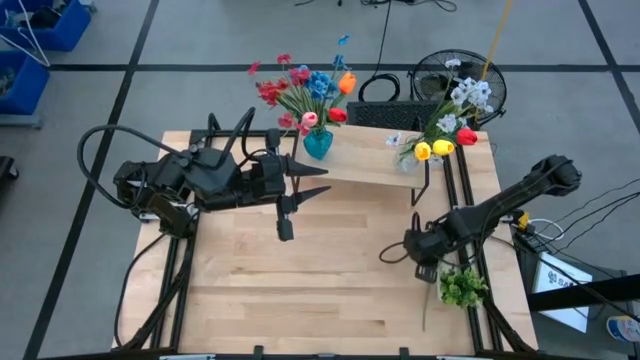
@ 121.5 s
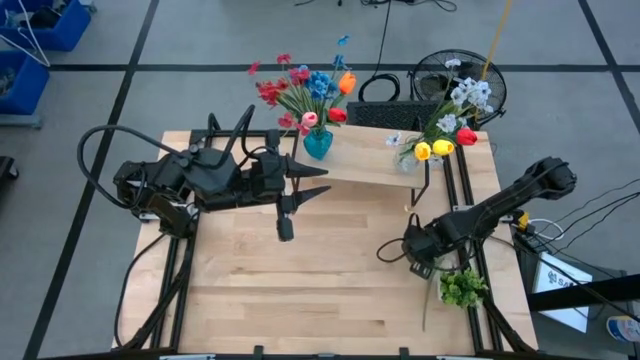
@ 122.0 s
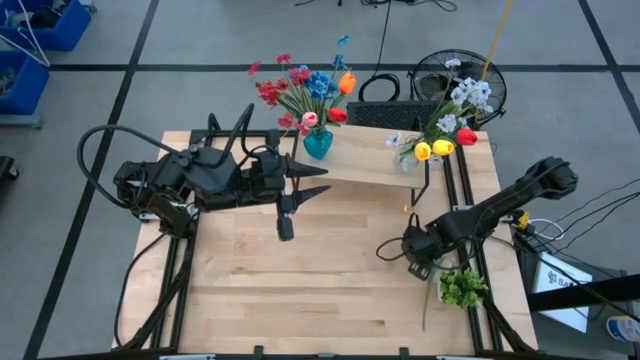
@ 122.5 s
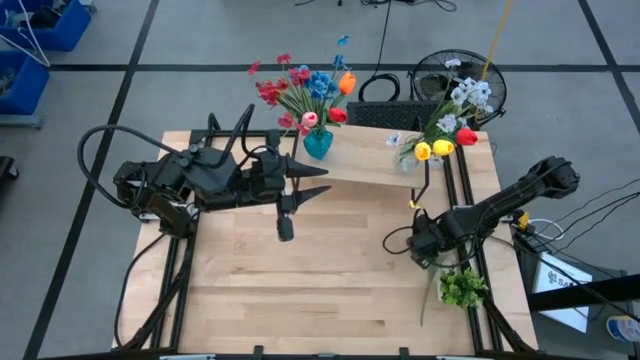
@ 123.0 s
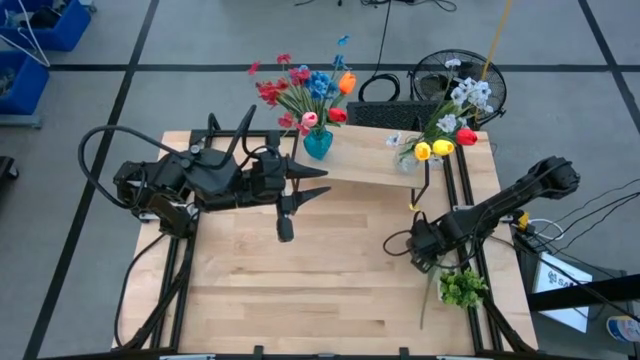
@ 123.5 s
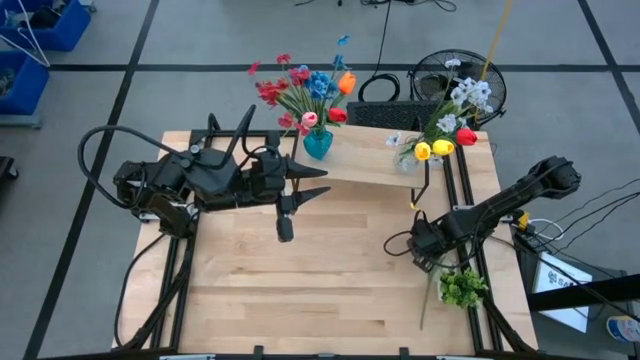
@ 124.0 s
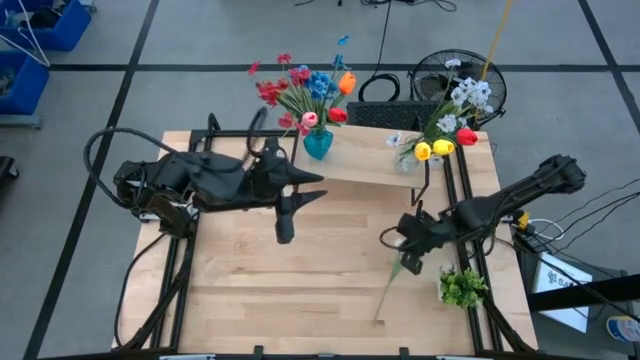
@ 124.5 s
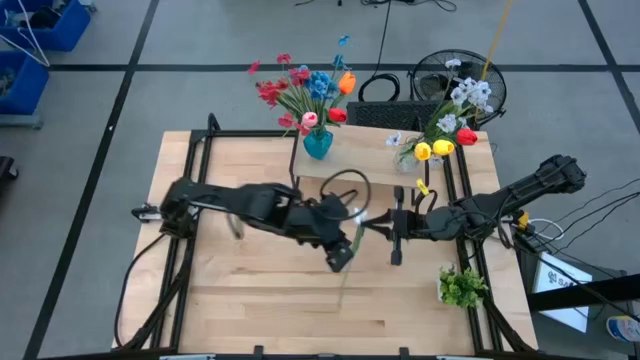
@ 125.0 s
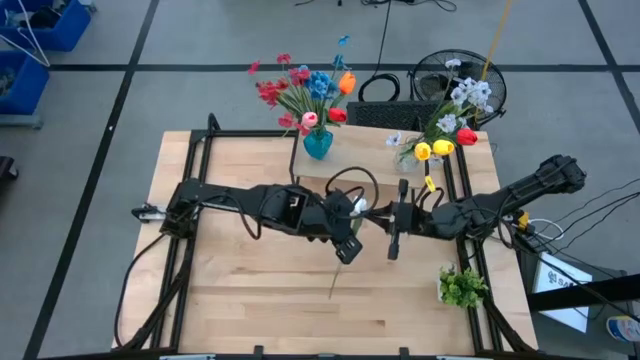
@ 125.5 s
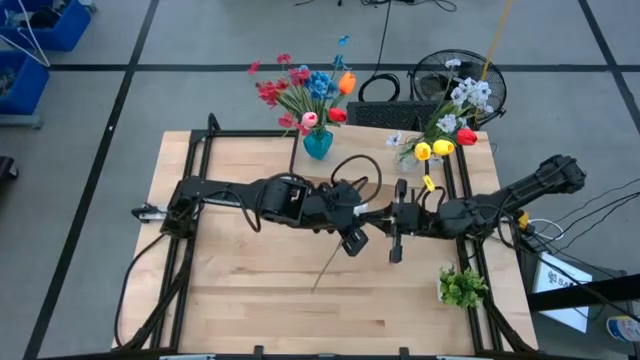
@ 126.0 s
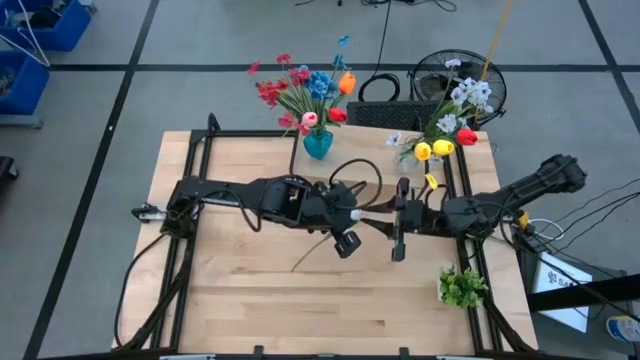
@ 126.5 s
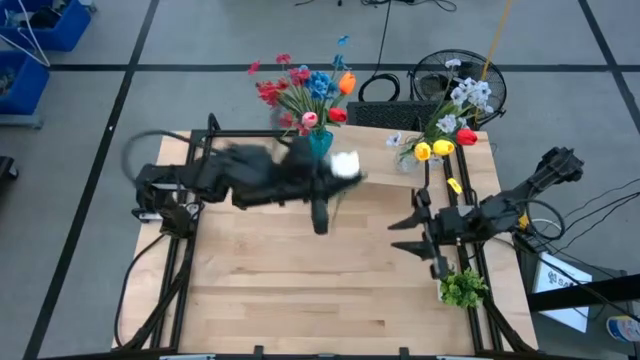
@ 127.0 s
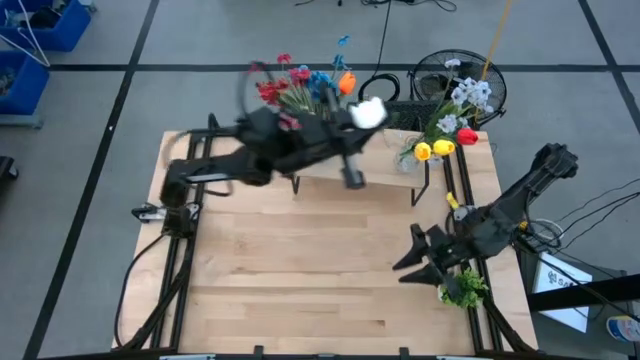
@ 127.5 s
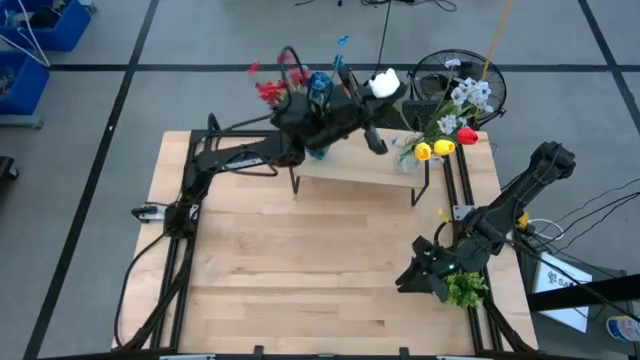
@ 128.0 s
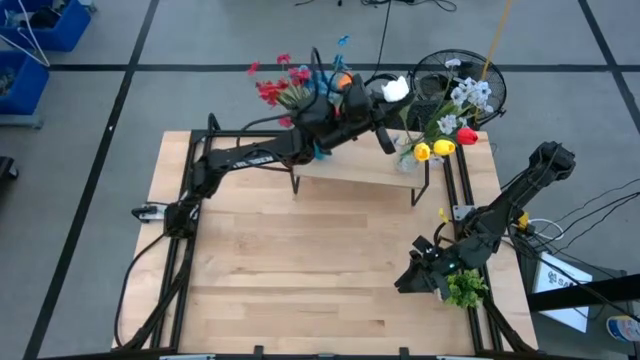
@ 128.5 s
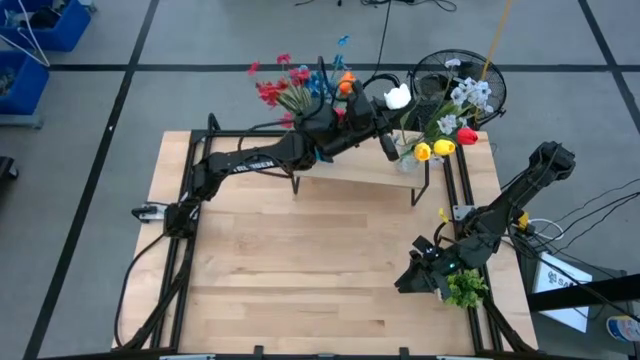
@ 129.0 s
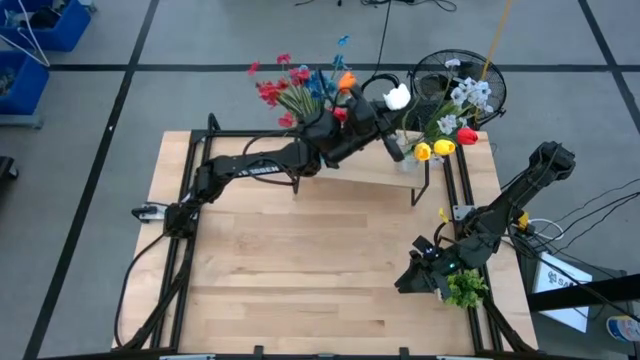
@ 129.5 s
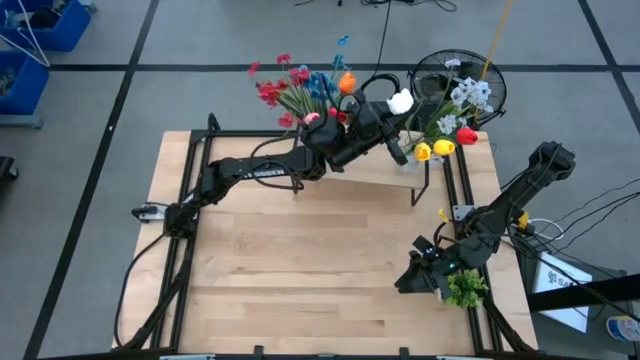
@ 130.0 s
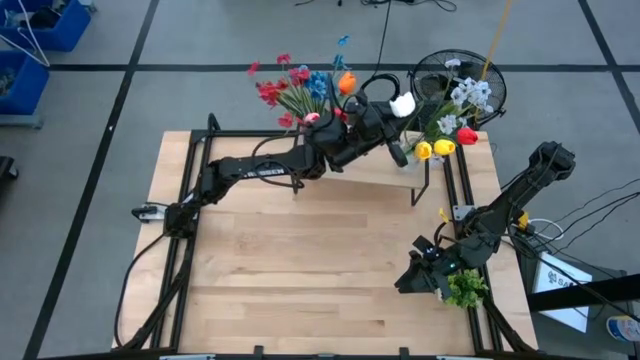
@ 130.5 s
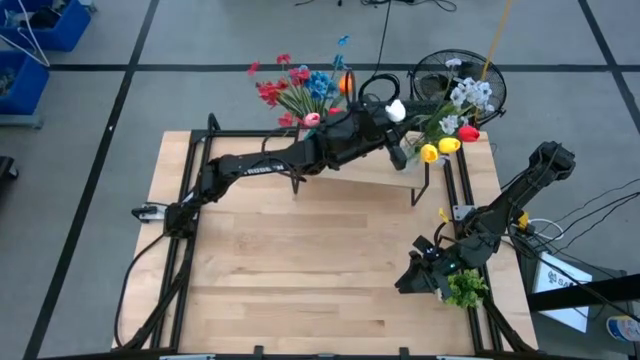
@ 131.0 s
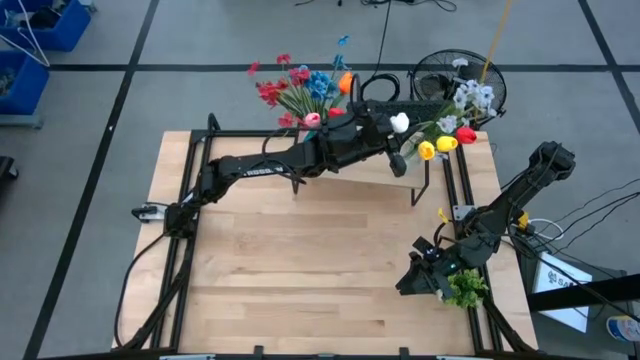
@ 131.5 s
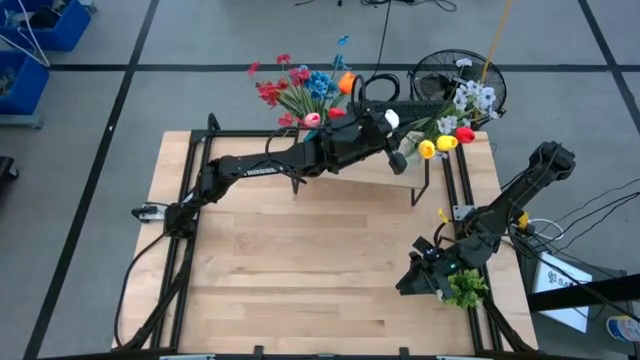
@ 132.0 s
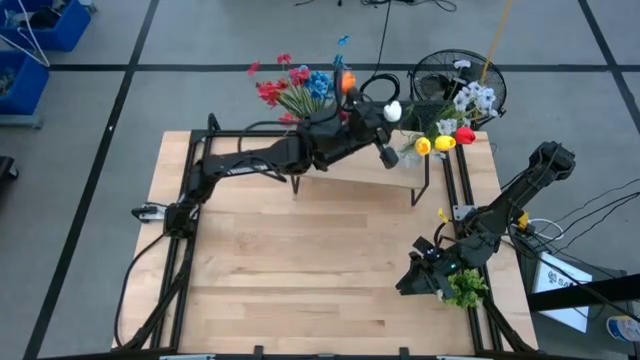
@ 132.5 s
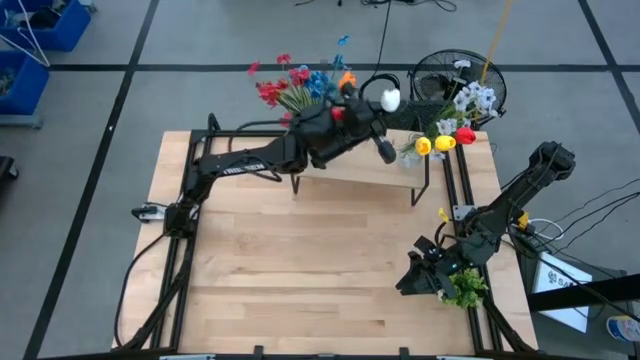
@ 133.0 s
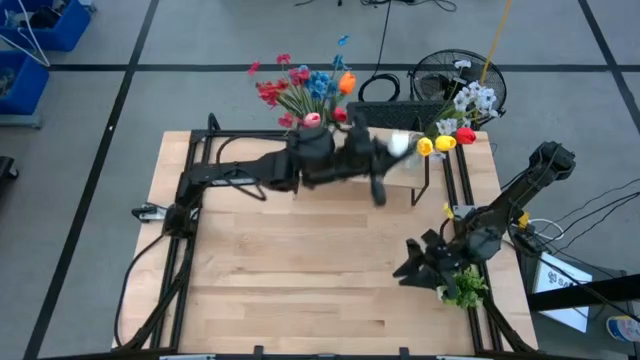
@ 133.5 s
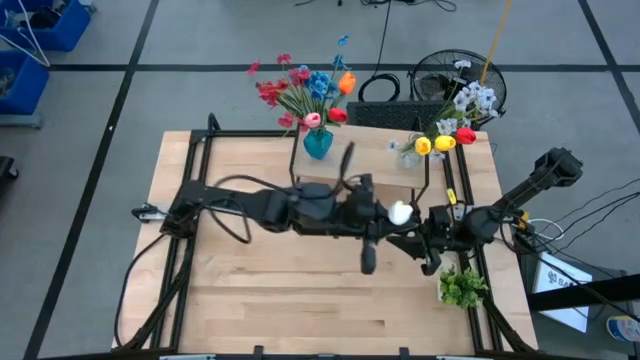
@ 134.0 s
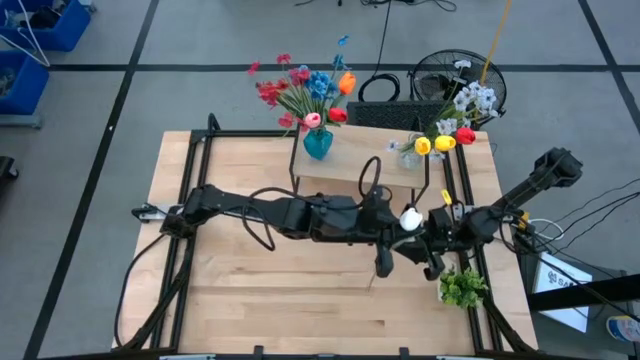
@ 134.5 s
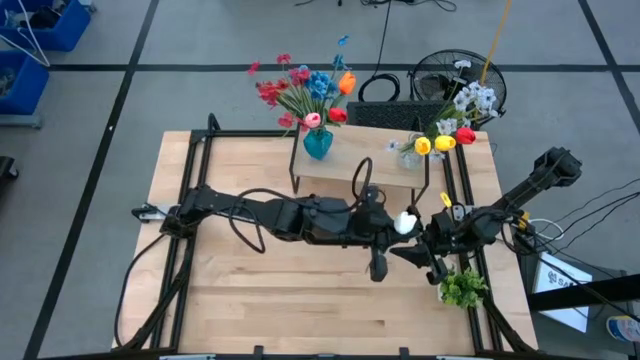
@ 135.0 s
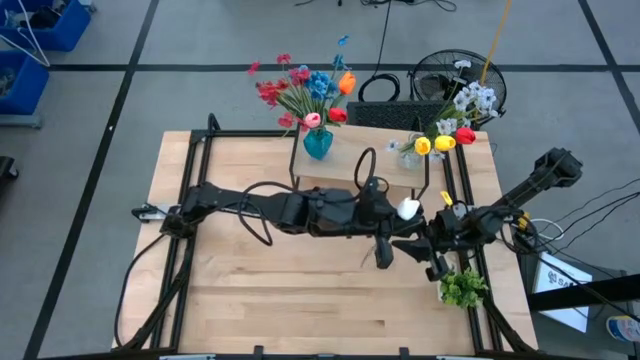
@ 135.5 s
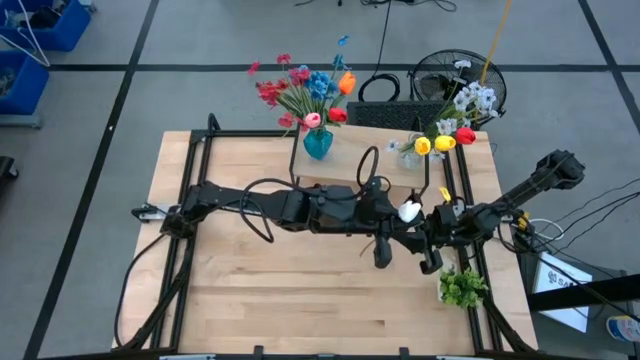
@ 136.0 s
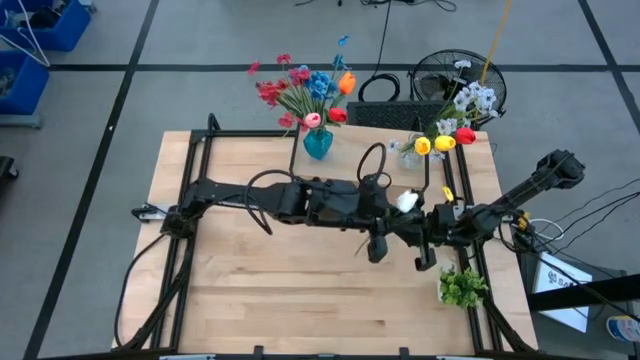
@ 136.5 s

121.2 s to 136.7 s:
Task: Pick and place flowers into a vace then onto a shelf
Put the white tulip into the transparent vase

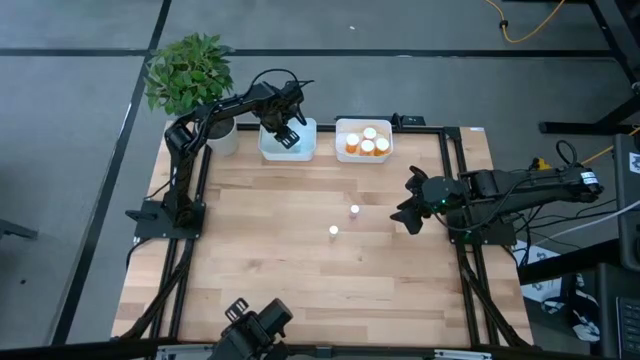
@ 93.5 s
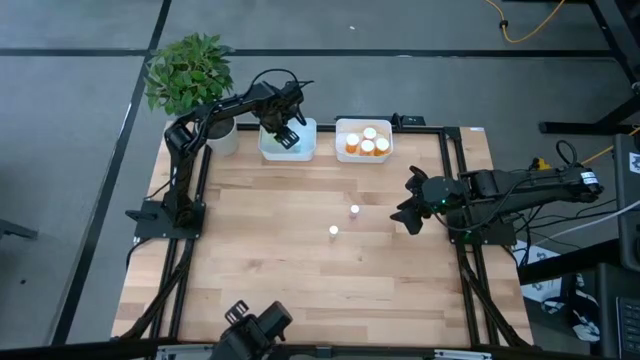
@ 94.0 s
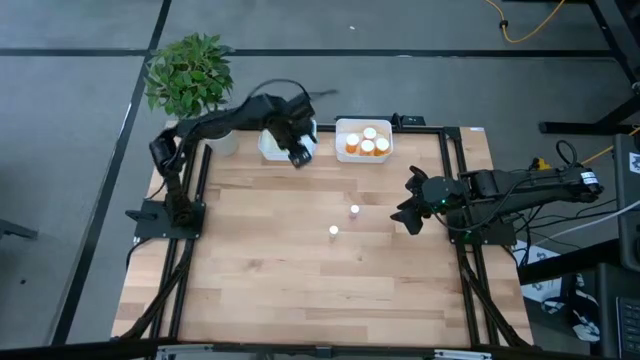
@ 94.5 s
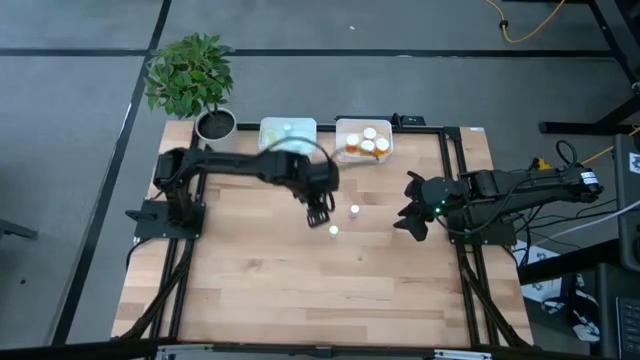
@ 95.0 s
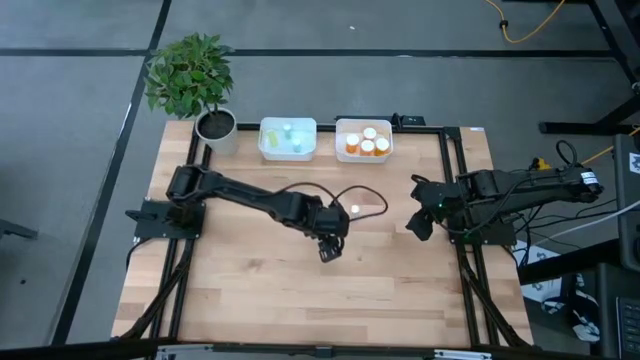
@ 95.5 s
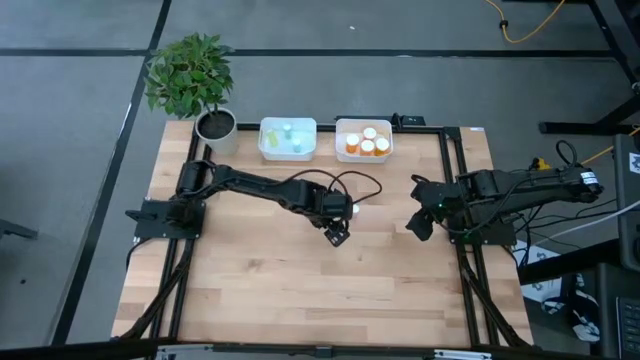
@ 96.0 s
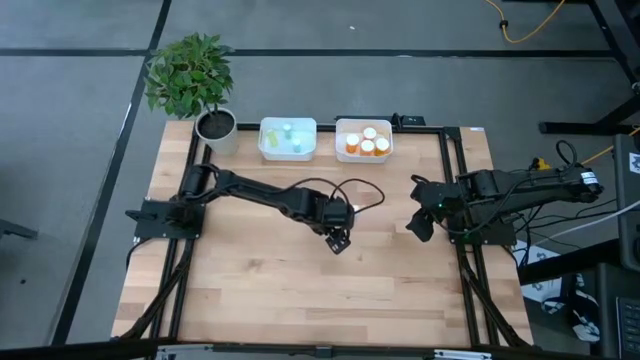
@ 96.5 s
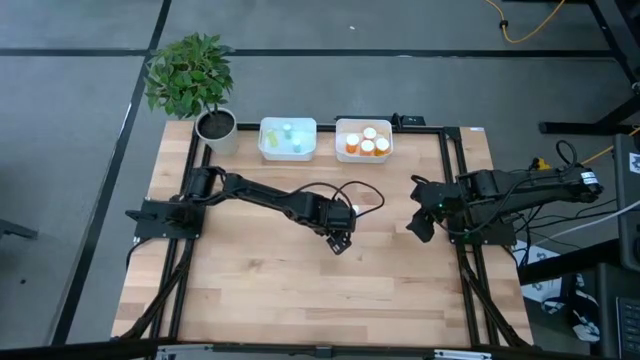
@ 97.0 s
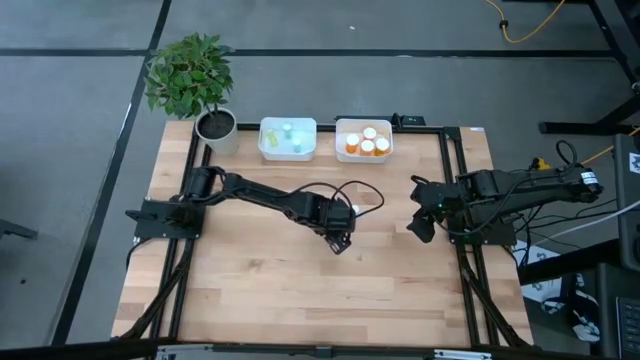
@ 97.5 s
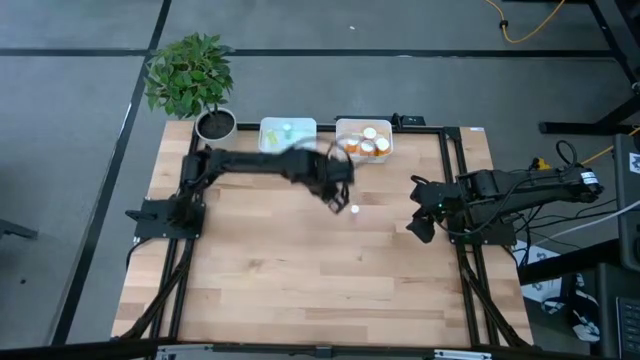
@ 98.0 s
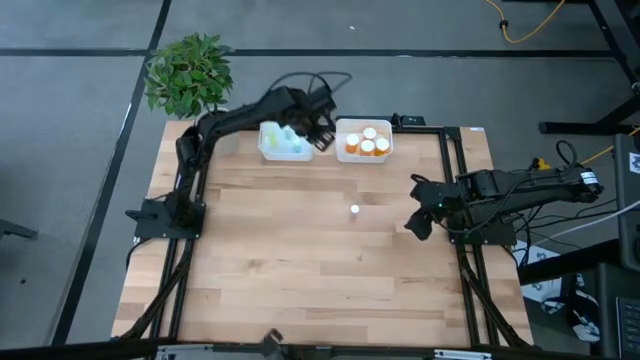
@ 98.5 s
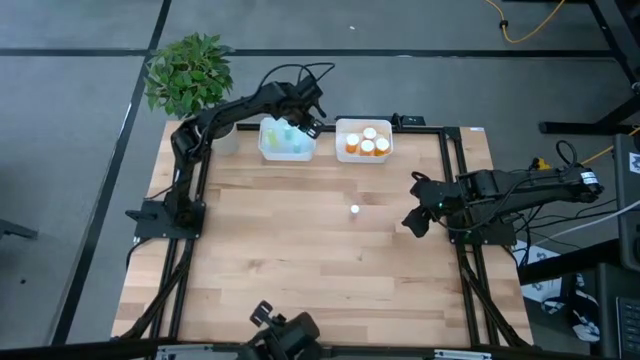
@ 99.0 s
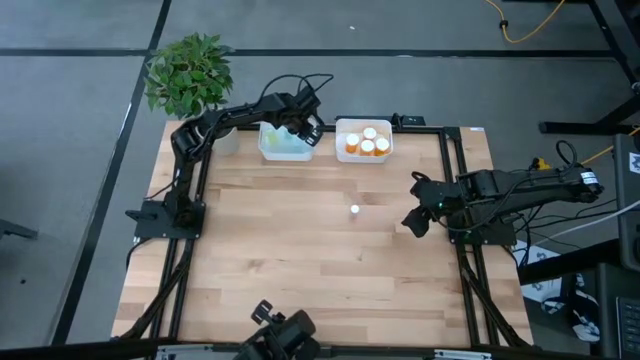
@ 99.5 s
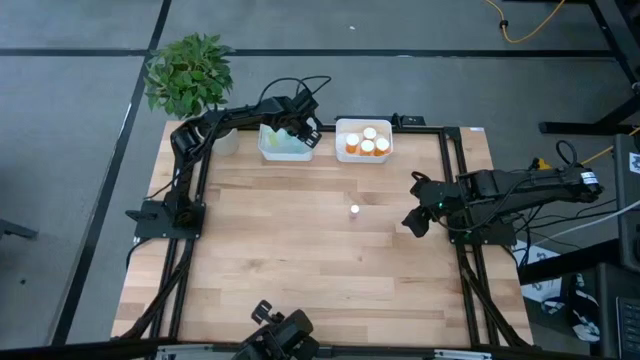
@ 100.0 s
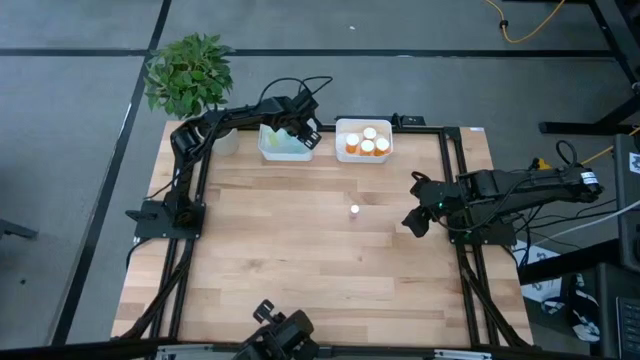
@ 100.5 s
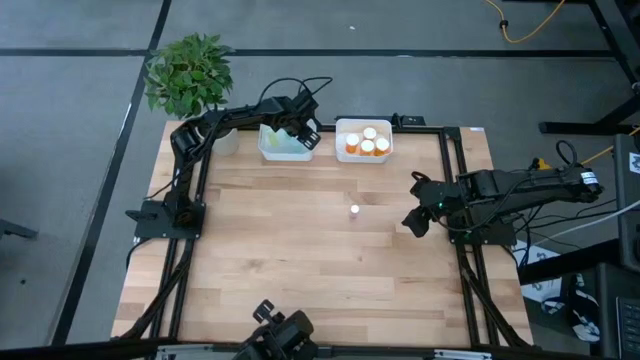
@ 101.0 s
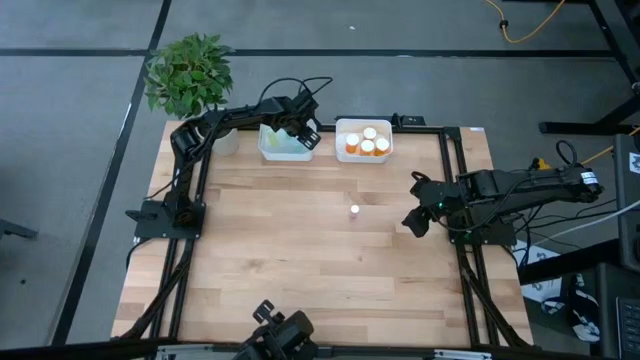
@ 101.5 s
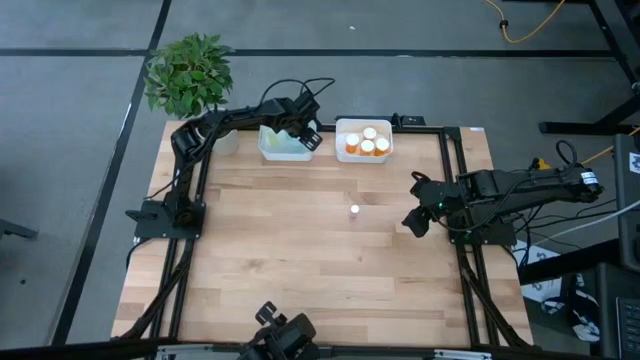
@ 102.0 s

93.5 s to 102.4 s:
Task: Pick and place medicine bottles into bin by pill shape (circle, oval)
Put the yellow tablet bottle into the left white bin
